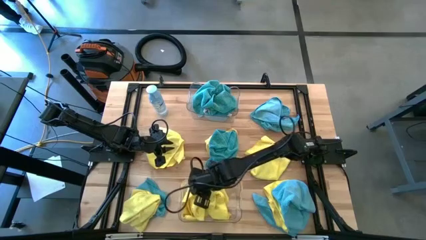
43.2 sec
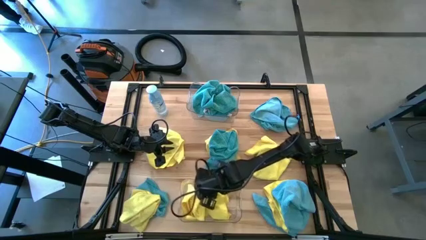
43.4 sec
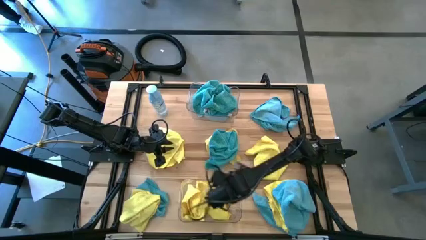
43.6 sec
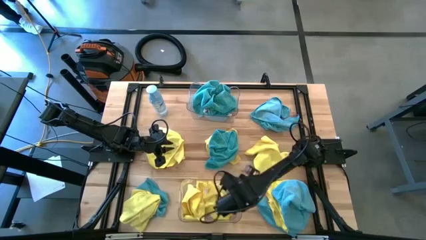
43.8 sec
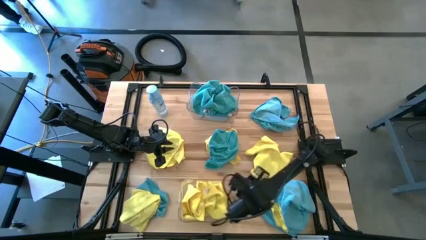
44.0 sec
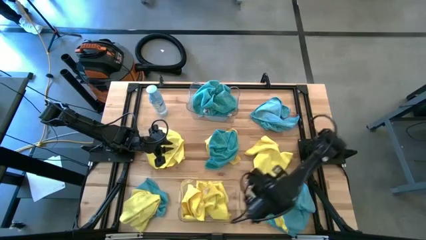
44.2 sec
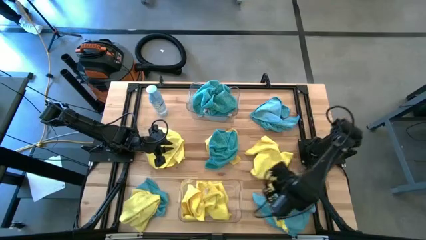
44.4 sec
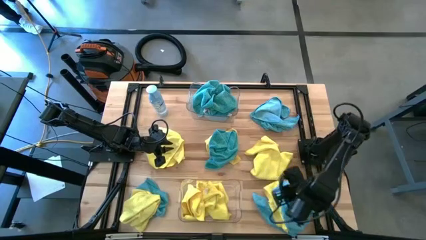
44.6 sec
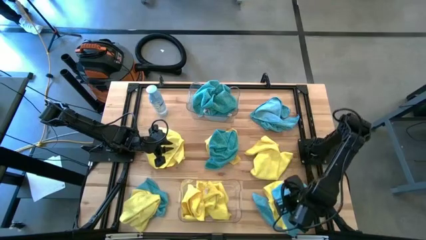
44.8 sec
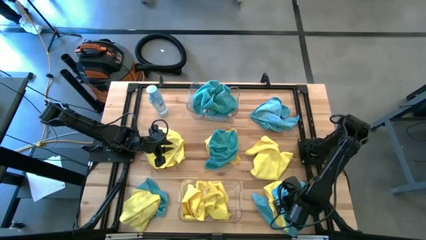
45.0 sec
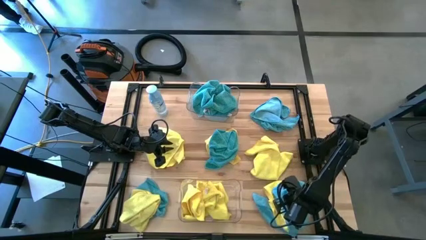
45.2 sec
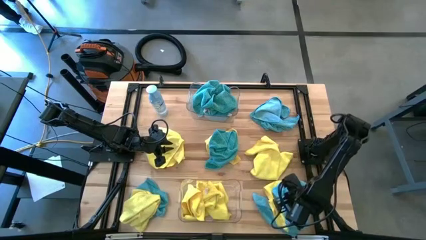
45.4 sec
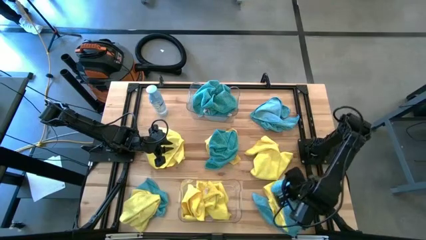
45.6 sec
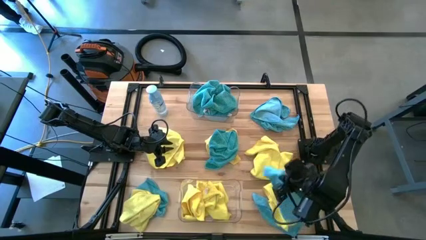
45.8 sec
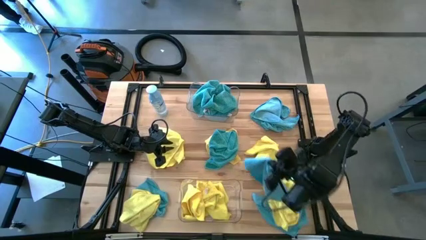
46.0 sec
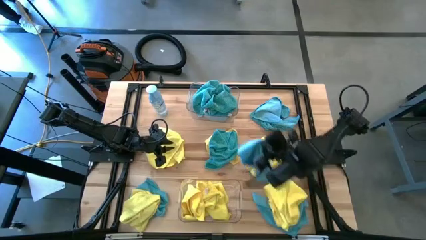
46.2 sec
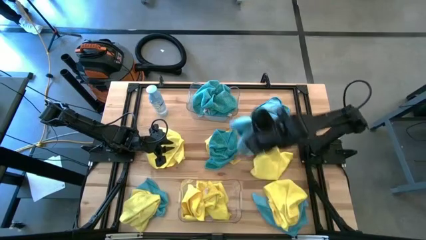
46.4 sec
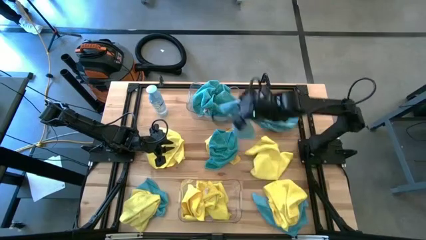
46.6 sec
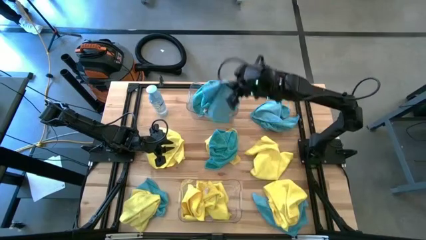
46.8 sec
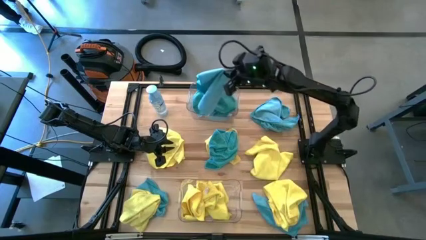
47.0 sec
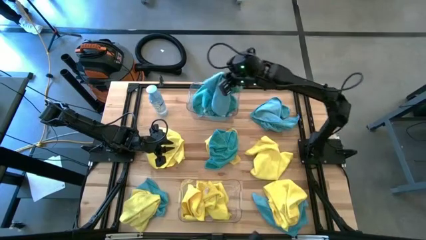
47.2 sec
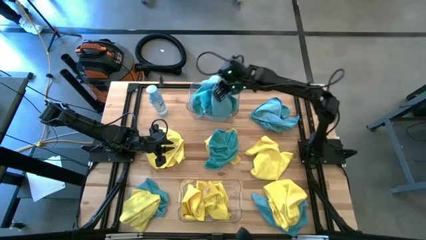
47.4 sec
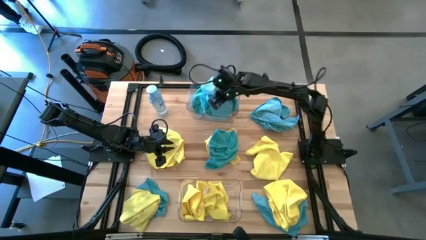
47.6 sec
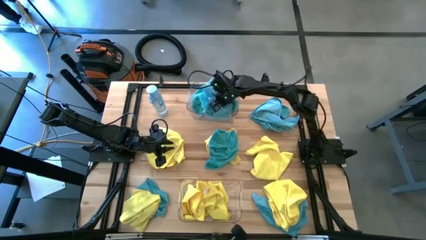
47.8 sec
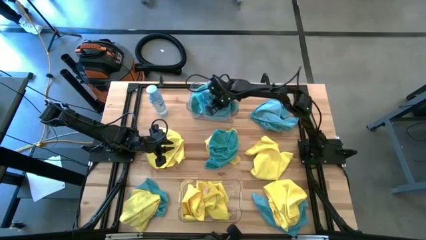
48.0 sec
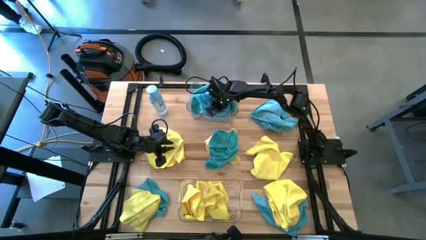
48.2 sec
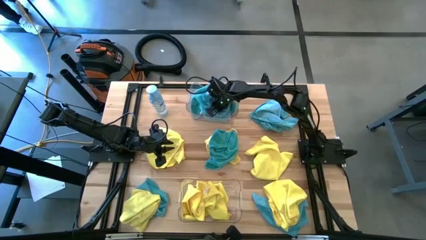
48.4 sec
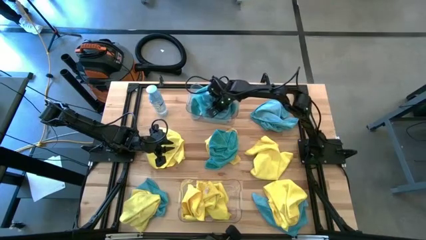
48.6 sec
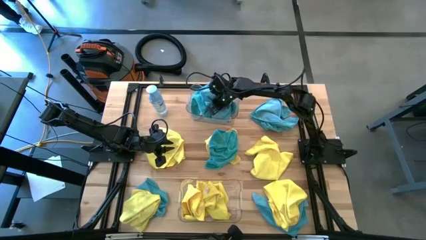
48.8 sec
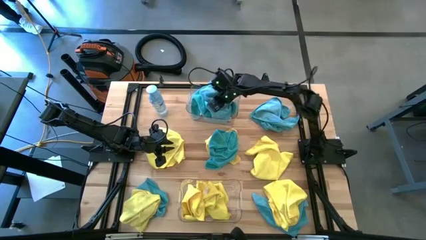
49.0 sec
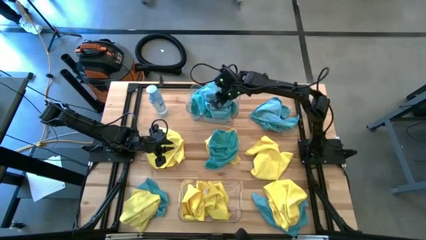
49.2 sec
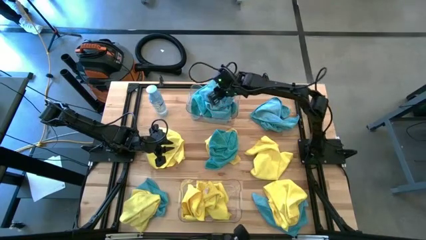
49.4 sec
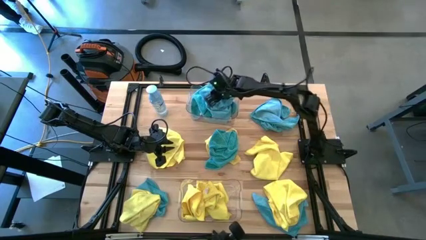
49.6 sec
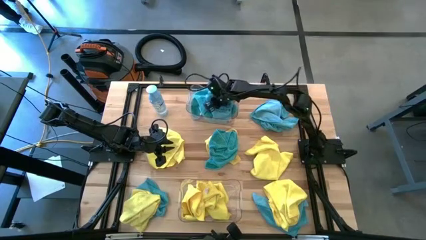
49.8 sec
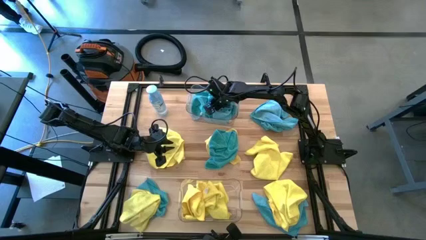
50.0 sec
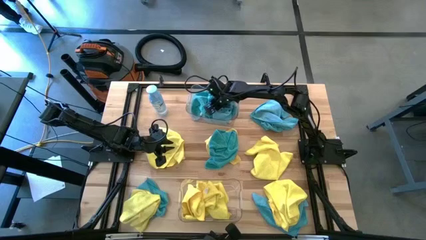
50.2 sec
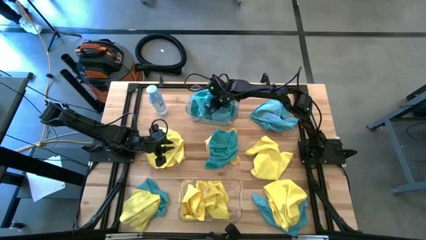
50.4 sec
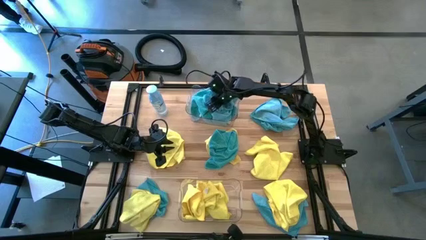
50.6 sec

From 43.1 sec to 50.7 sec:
Task: Sort microfiber towel by color & place in baskets
Put the blue towel into the top transparent bin

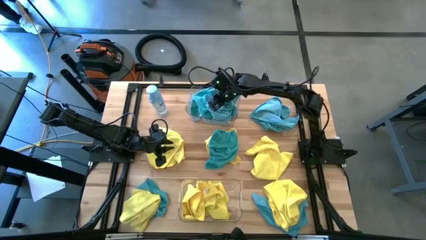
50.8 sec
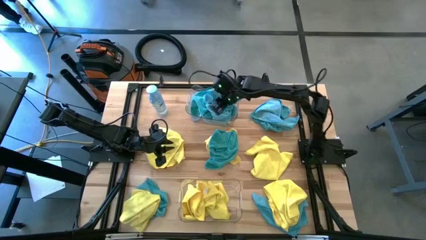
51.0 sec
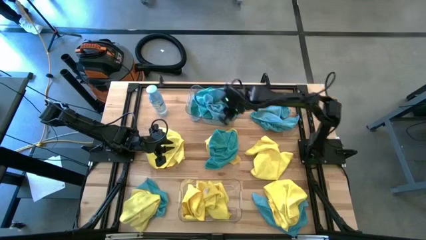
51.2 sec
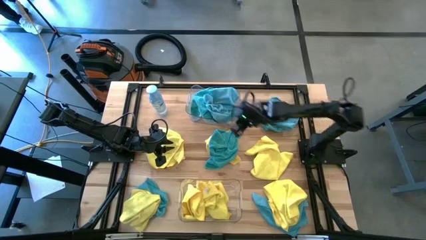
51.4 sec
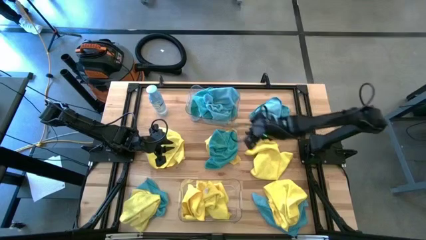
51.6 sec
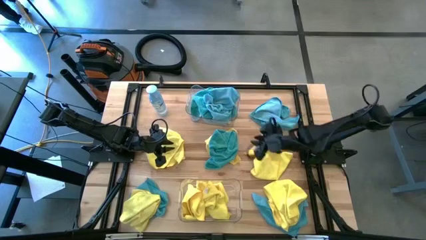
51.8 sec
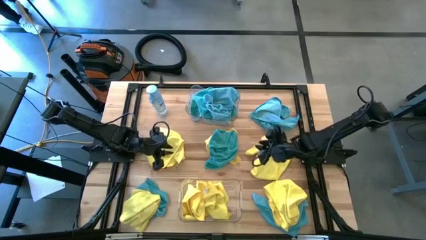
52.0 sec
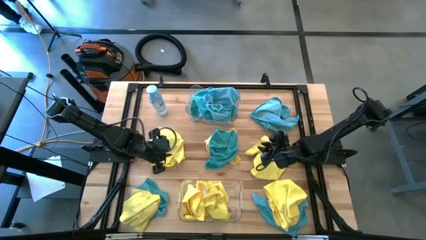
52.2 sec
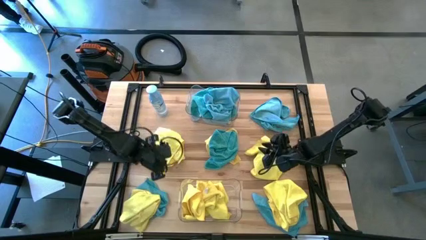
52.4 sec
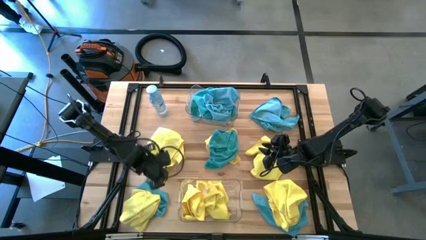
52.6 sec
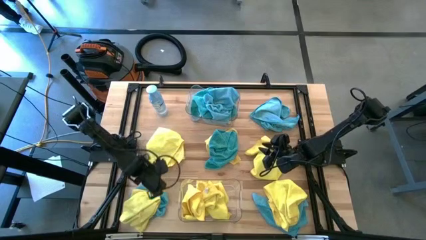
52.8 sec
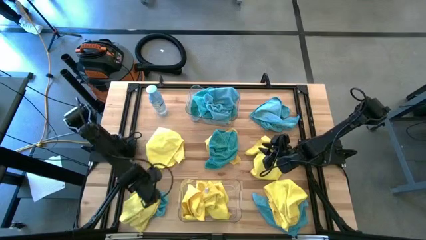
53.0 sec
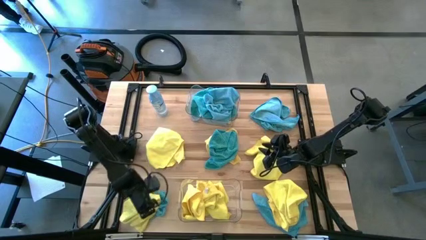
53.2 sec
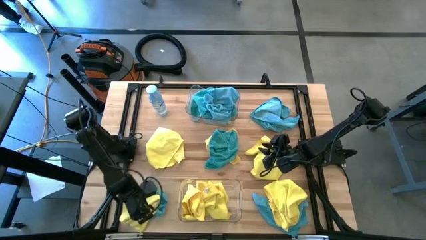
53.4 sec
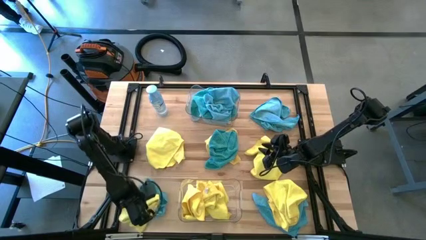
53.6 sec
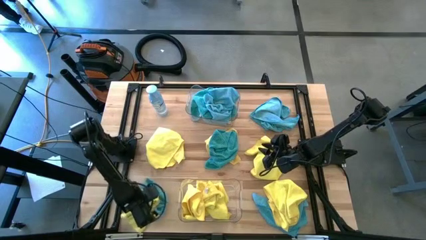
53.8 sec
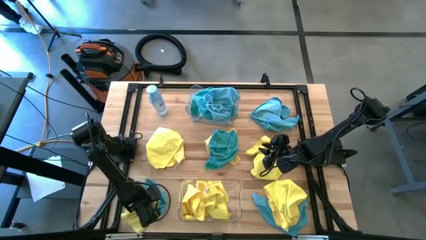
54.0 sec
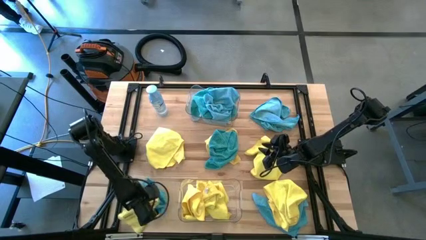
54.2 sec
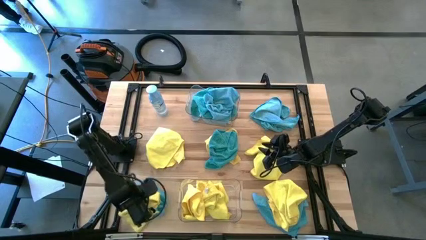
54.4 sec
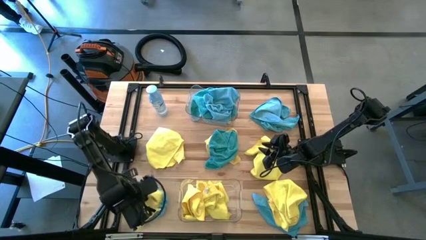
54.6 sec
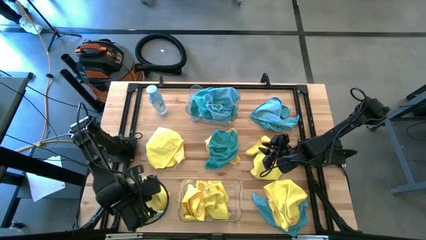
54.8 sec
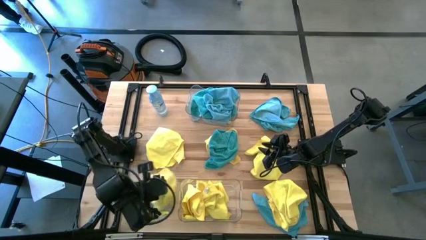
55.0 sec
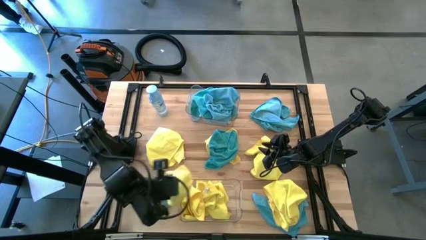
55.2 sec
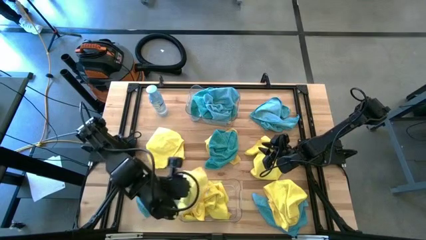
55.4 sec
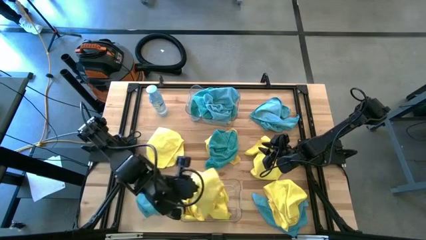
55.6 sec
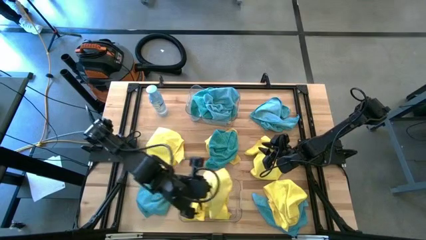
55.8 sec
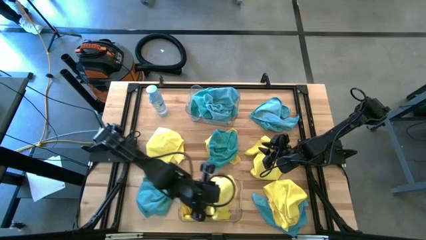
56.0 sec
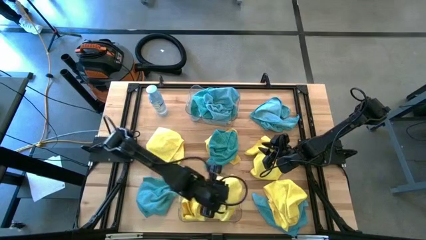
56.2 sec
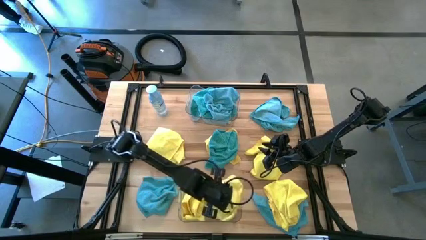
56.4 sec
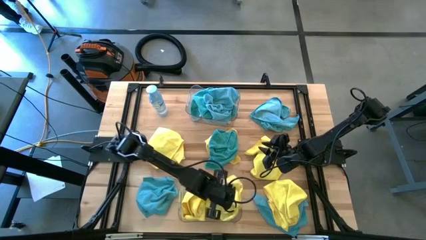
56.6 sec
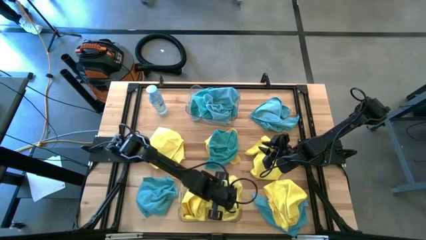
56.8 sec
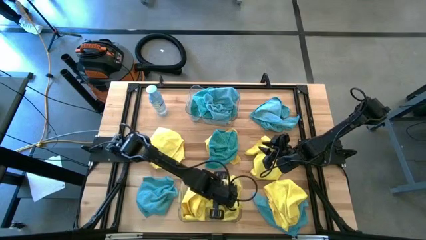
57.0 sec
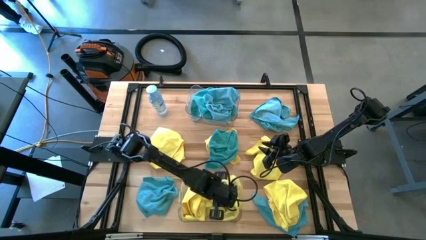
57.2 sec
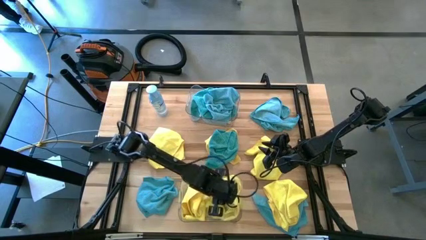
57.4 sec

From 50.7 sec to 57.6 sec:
Put the yellow towel into the bottom transparent bin

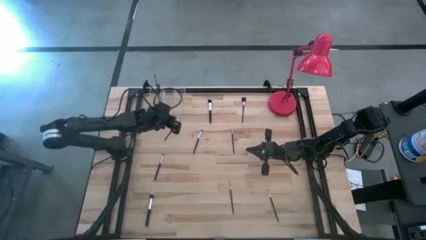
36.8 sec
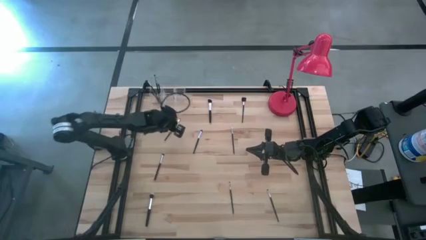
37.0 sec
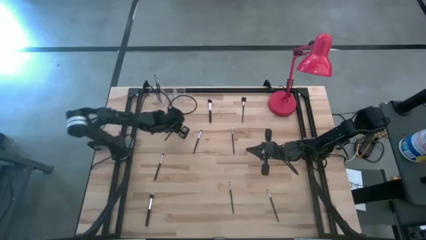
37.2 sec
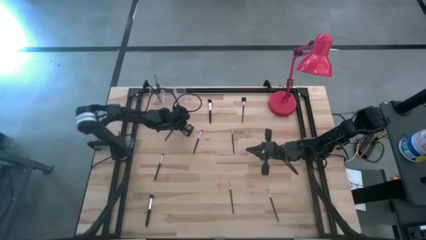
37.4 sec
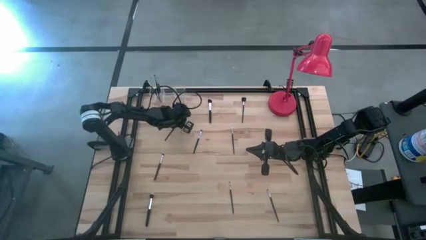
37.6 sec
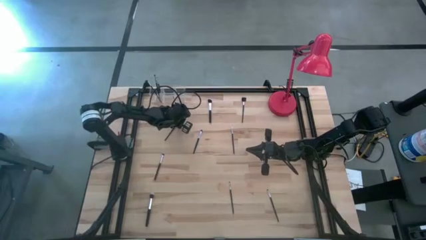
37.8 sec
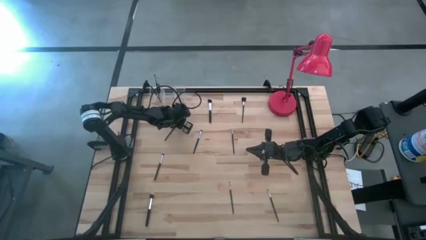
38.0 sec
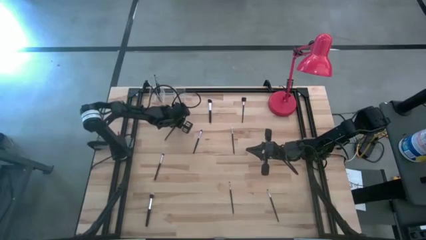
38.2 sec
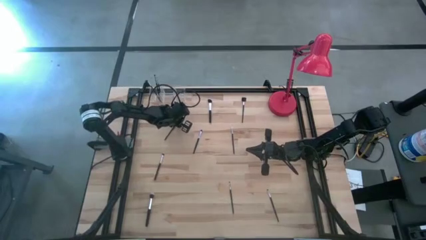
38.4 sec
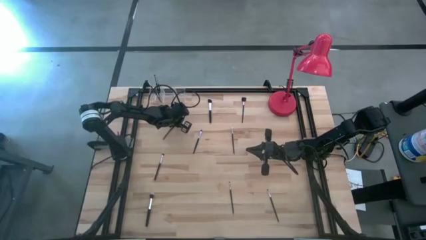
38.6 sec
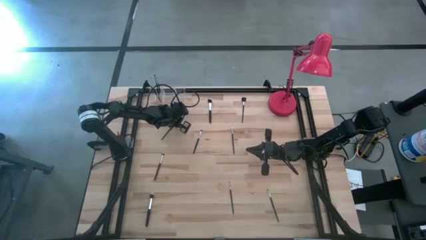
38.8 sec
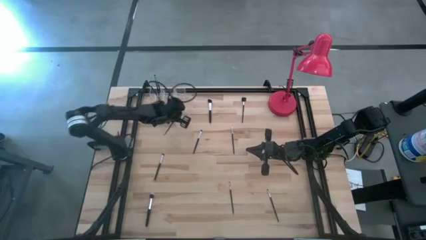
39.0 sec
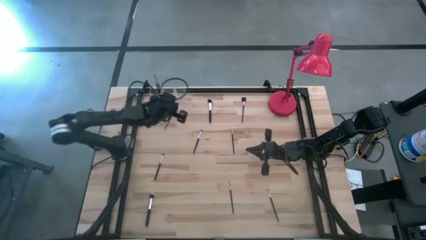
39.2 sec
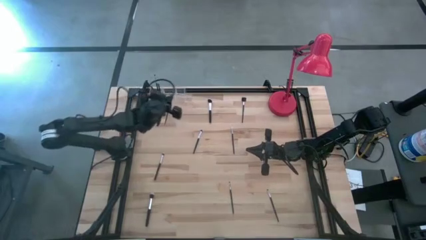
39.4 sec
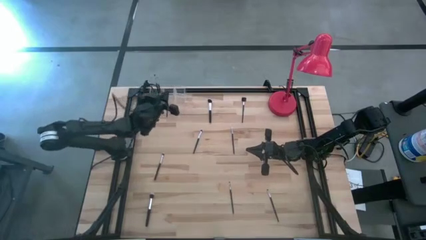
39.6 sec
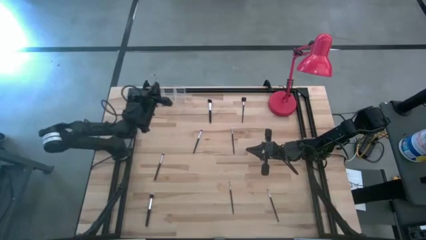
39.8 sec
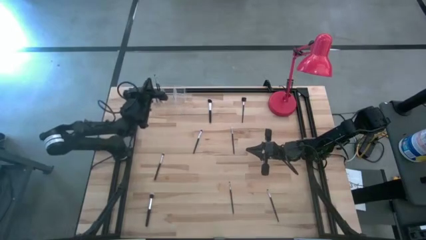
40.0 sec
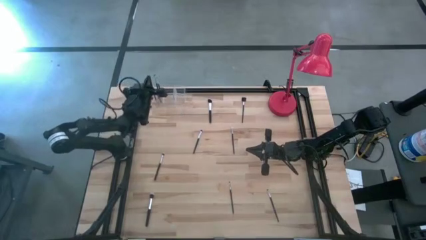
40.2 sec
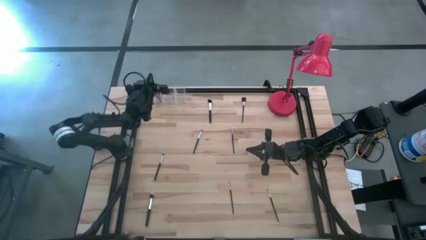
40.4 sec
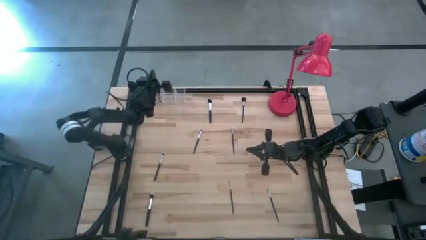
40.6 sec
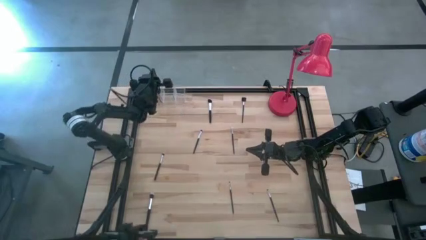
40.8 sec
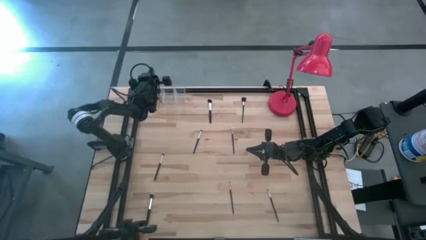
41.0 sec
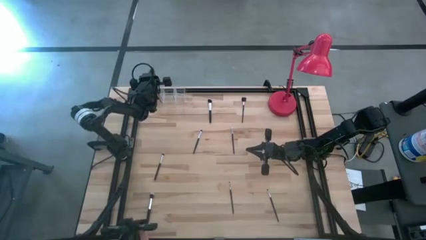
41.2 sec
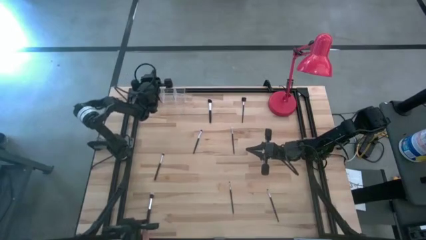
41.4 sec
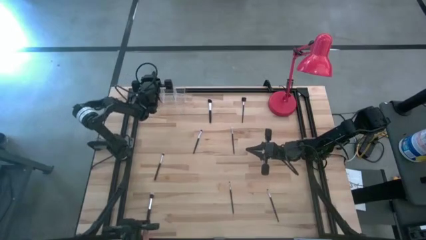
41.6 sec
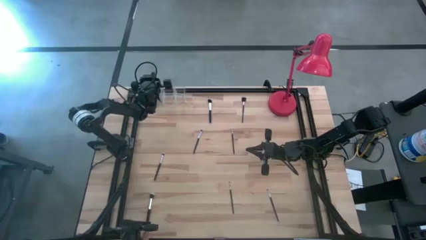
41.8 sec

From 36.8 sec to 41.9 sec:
Task: Pick & Place Makeup Brushes
Put the lip brush into the transparent organizer
